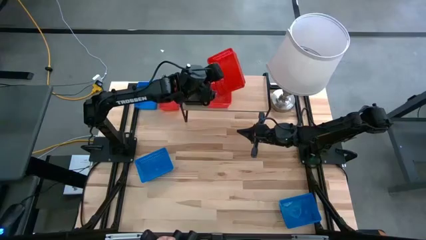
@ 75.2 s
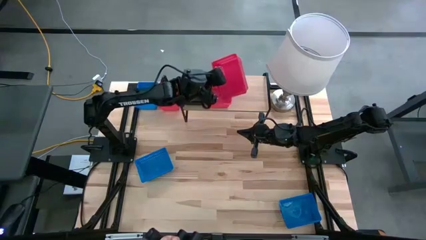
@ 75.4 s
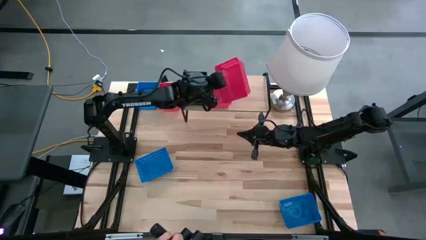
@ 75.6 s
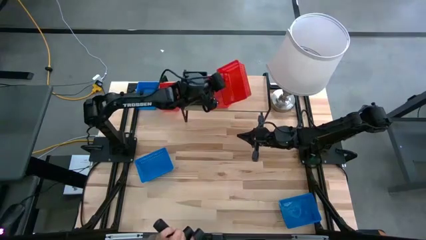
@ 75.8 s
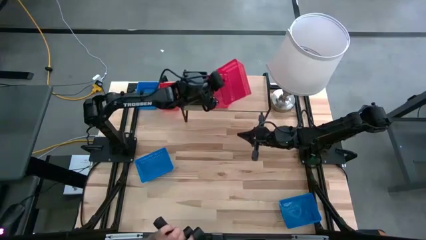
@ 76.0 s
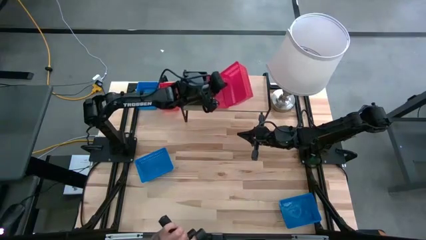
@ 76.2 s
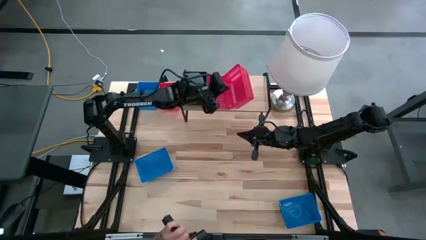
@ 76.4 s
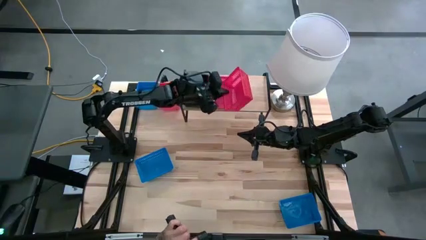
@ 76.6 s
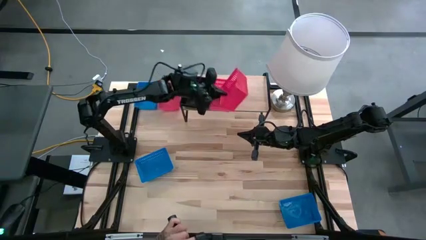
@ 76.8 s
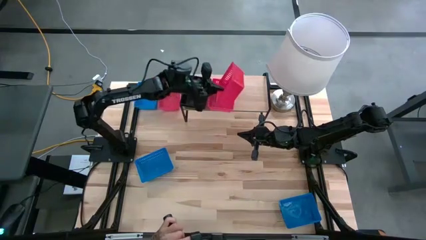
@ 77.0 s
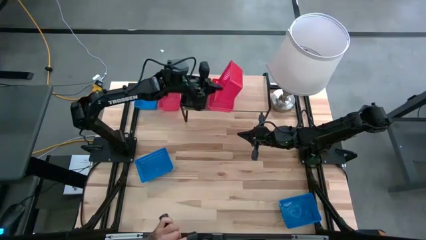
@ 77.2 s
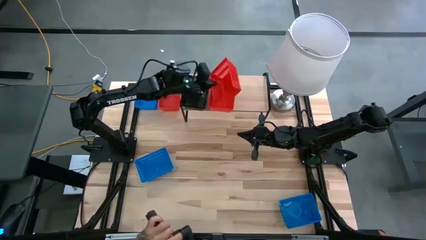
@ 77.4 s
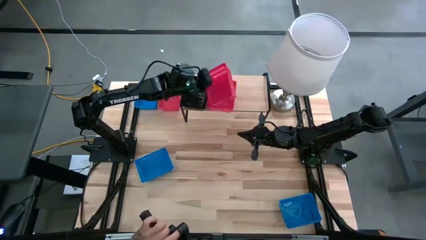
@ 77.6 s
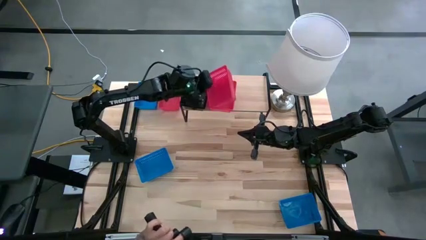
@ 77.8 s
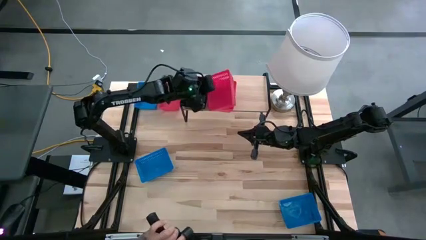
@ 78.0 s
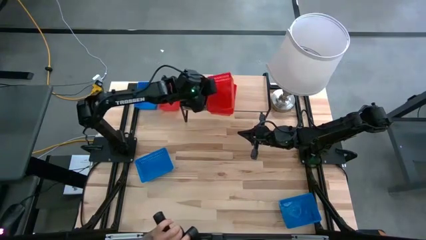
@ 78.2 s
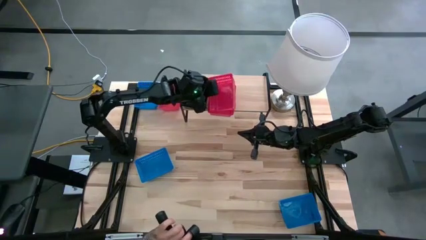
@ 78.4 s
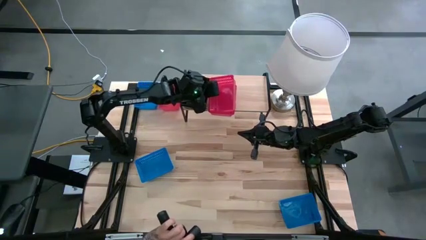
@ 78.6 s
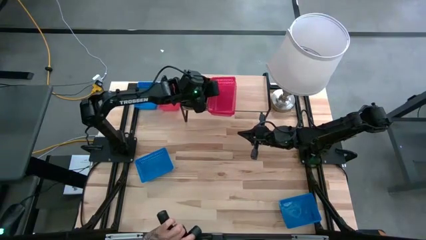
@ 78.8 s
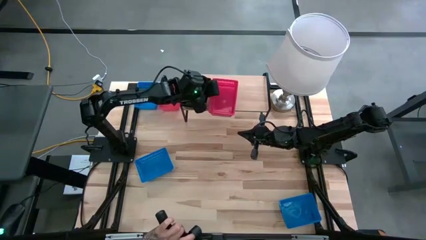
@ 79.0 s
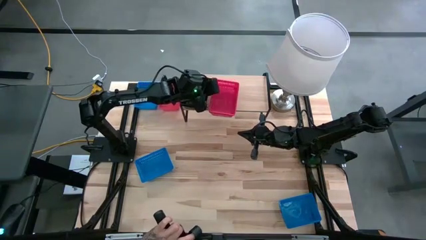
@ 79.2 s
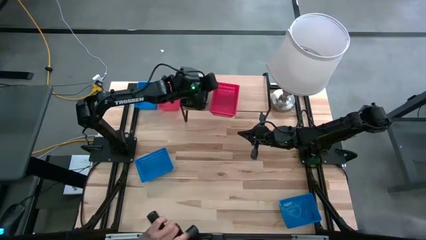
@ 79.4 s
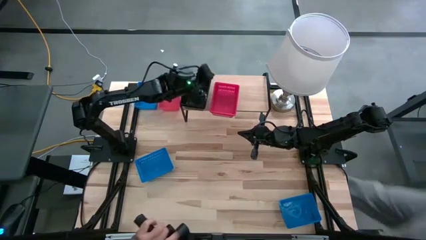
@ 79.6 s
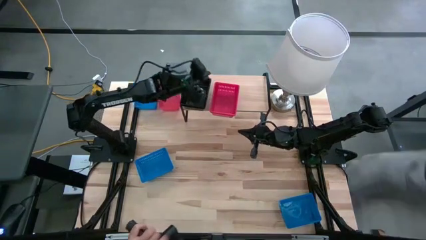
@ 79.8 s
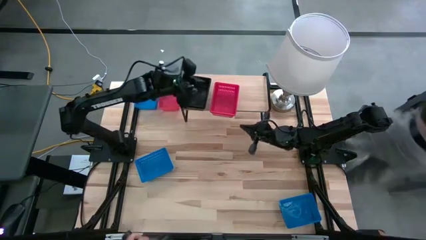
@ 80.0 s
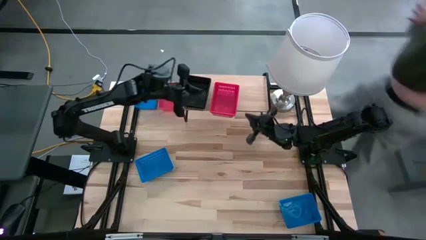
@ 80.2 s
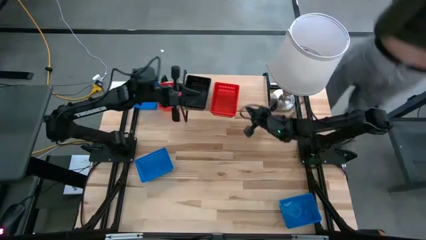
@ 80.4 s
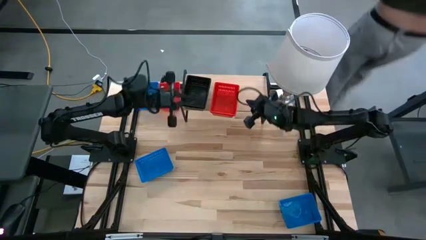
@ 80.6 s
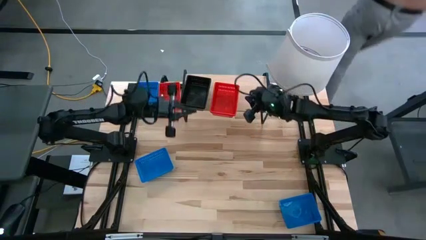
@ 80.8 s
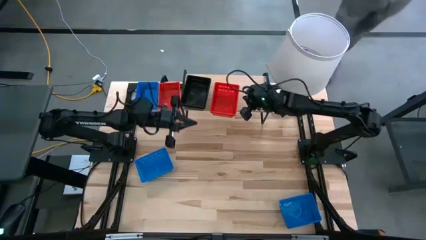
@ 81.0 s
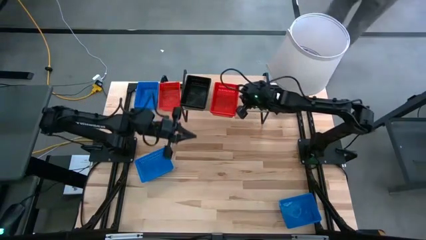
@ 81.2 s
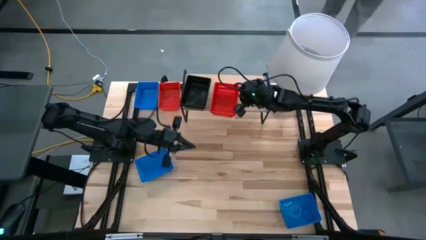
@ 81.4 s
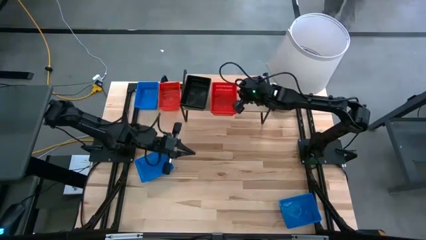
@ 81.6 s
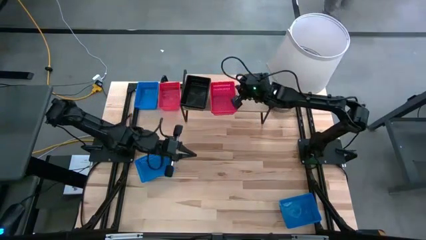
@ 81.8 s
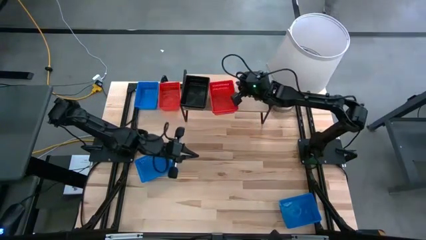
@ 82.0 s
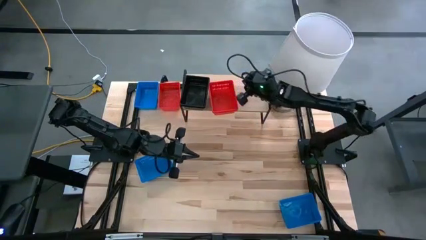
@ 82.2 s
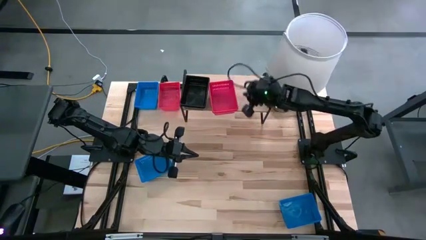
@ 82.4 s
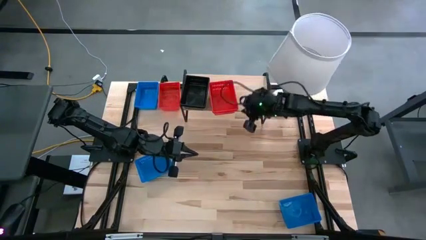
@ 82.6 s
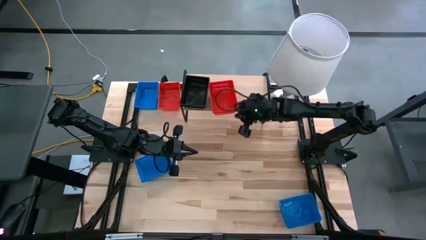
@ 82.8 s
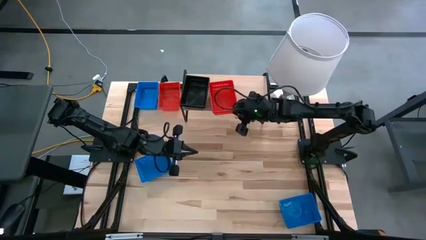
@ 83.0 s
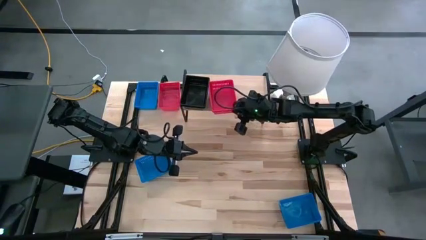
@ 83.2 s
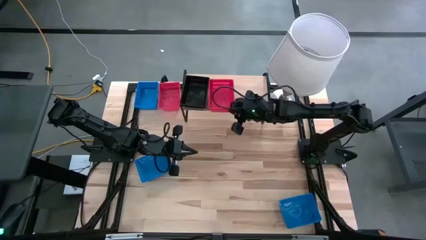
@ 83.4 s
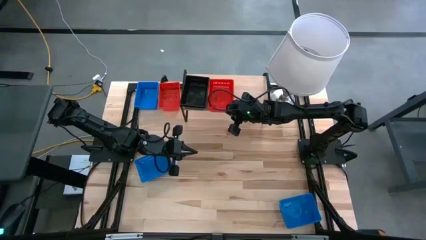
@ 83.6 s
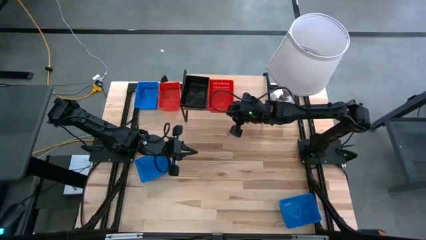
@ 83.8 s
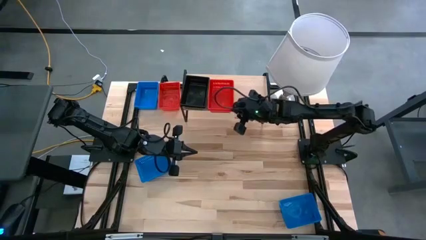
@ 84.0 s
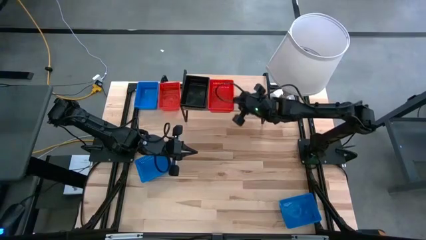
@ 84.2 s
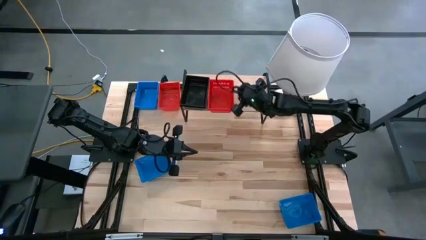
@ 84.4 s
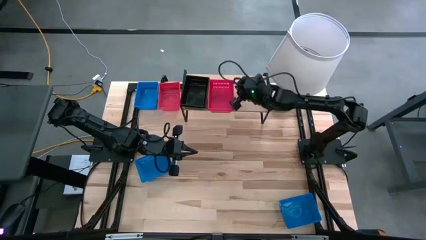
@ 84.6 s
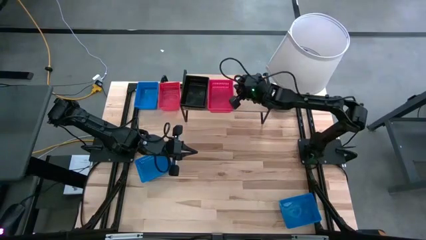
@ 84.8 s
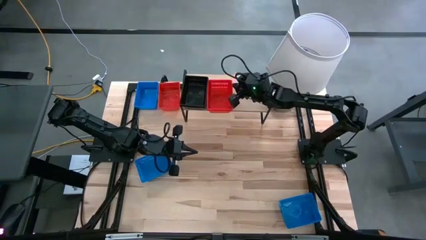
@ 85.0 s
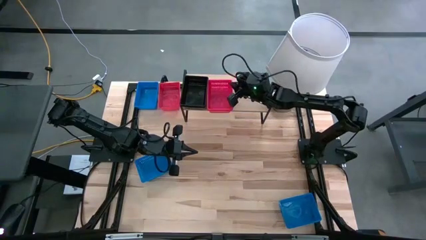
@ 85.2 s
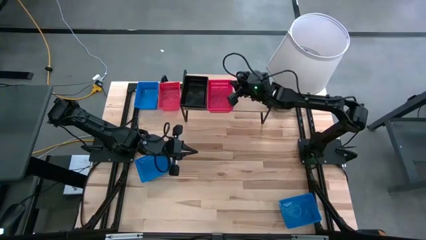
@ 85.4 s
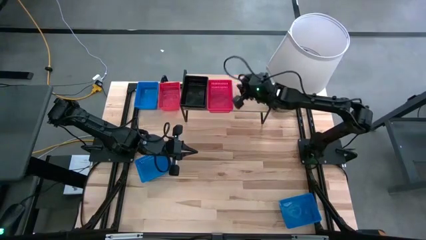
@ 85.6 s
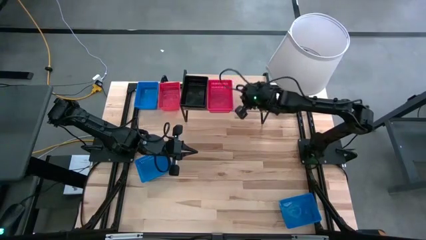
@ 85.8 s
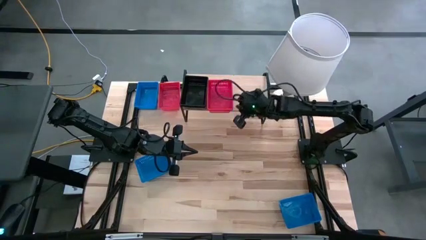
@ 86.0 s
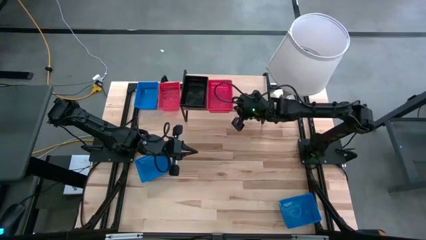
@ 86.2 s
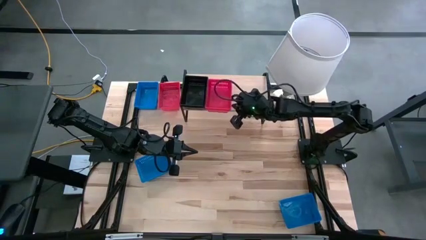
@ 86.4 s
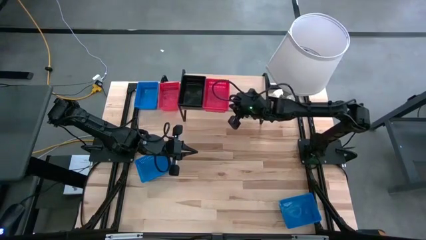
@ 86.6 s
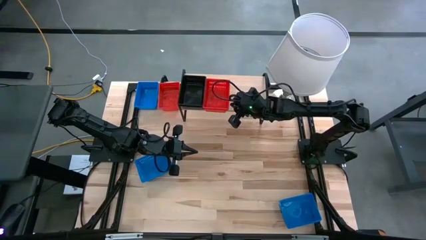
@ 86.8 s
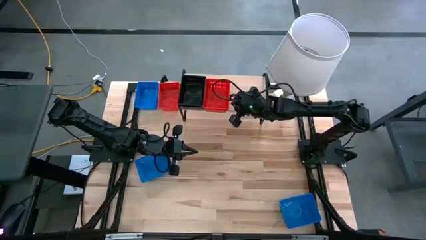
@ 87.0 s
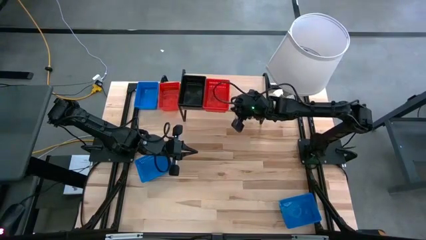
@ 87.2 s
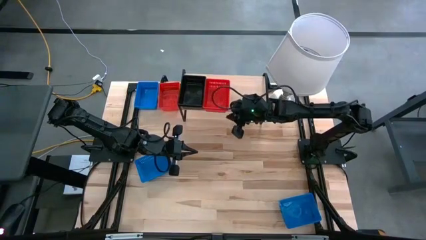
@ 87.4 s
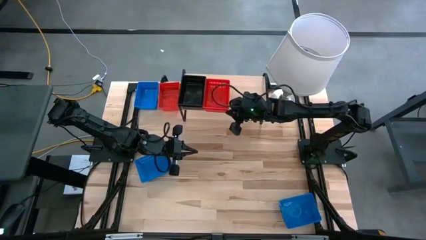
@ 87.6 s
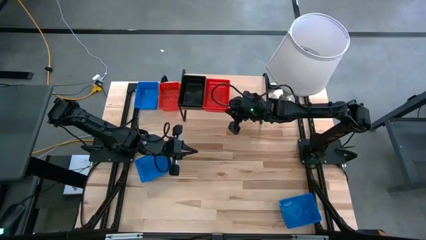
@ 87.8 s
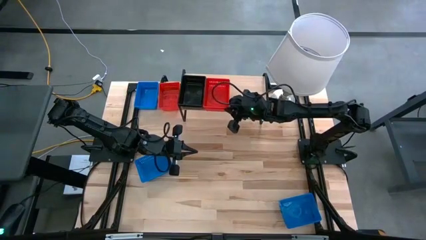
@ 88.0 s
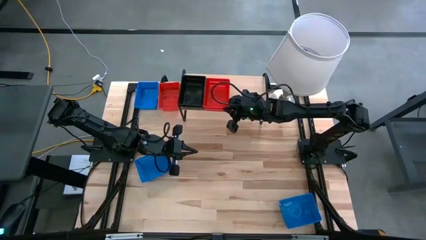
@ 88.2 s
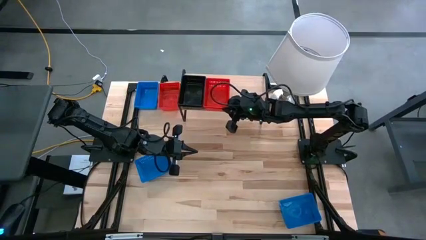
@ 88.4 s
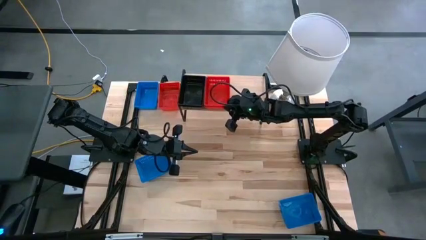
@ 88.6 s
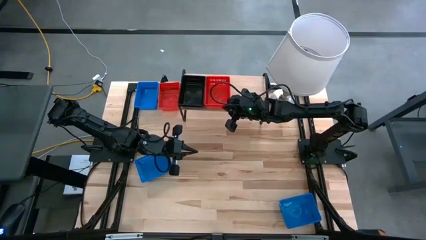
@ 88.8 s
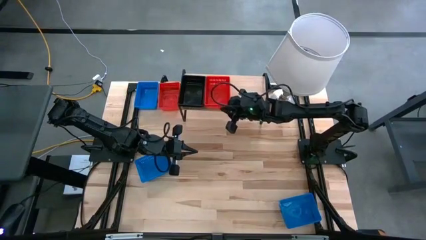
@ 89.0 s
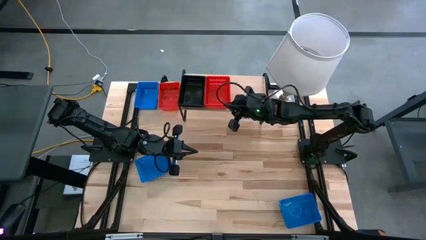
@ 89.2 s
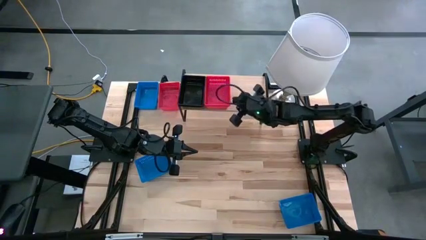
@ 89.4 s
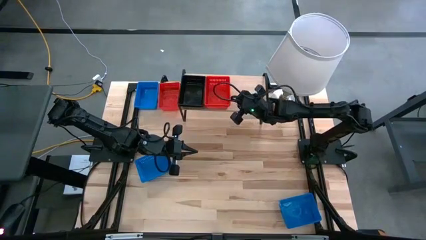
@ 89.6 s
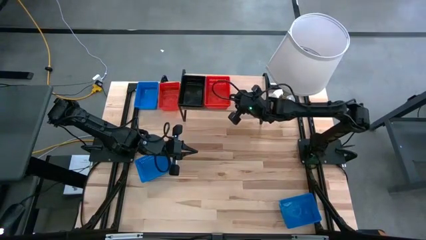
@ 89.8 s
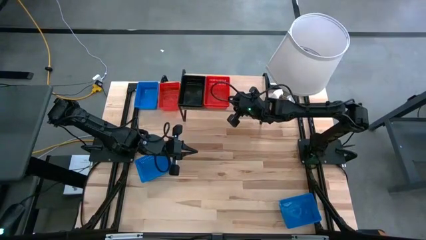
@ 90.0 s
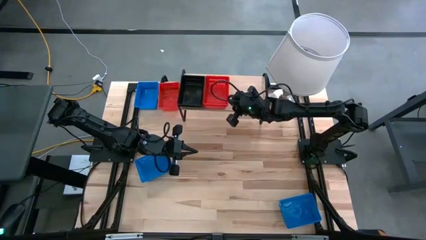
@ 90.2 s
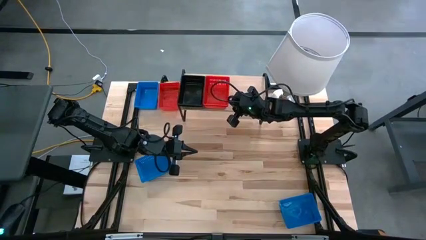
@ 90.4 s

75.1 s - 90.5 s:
Task: Stack baskets on shelf by color
Stack the bottom red bin on top of the red bin on the shelf
